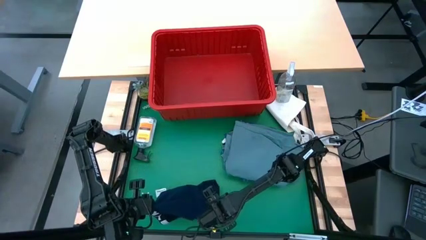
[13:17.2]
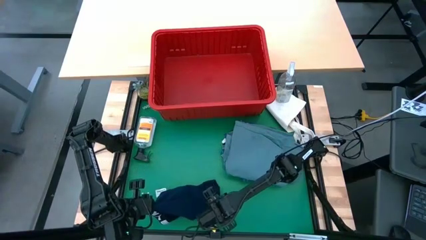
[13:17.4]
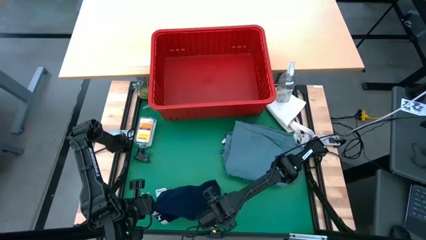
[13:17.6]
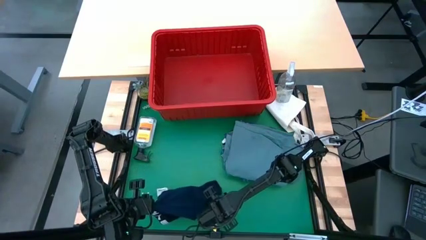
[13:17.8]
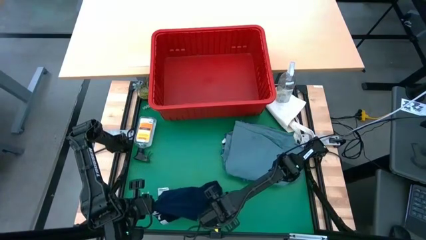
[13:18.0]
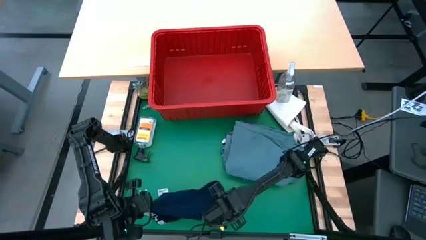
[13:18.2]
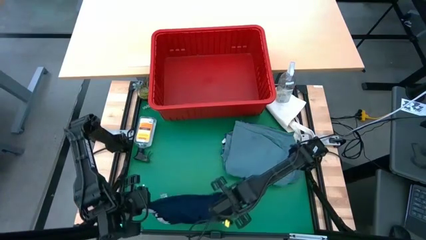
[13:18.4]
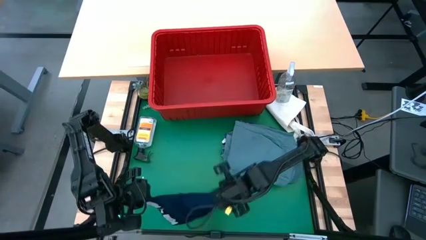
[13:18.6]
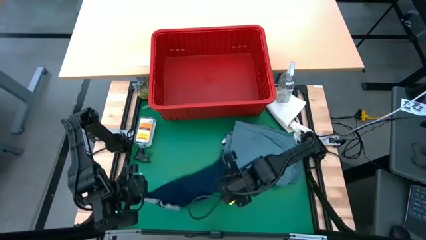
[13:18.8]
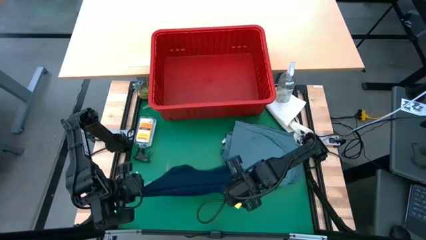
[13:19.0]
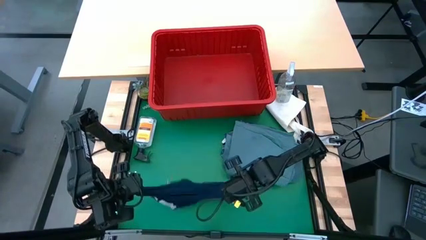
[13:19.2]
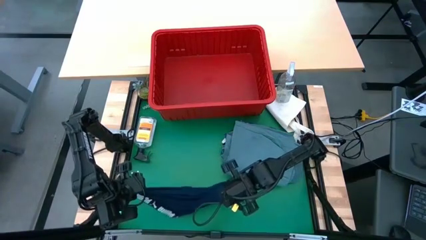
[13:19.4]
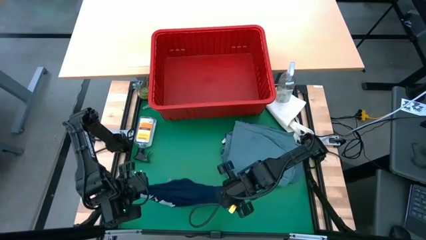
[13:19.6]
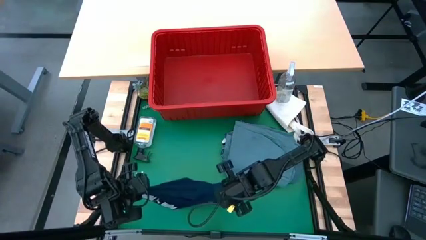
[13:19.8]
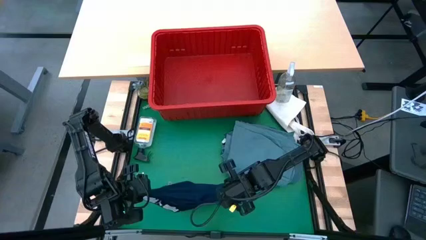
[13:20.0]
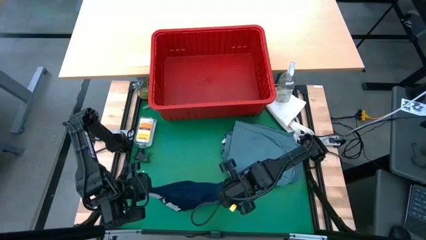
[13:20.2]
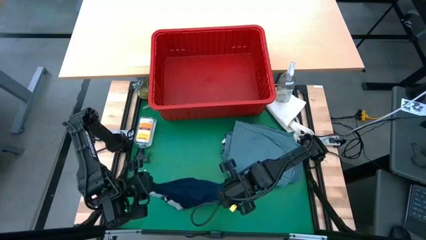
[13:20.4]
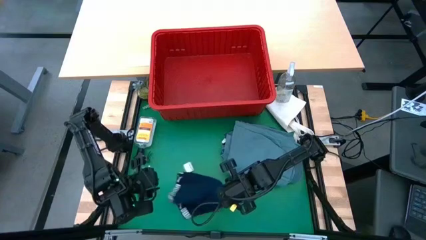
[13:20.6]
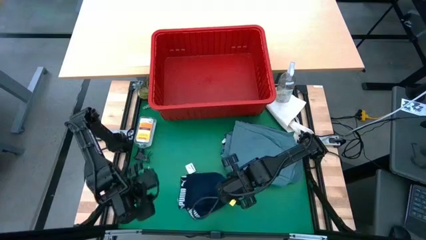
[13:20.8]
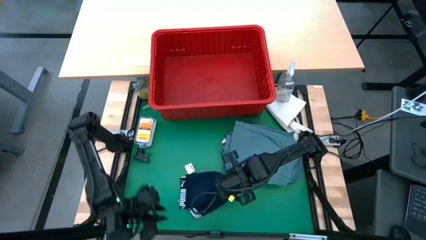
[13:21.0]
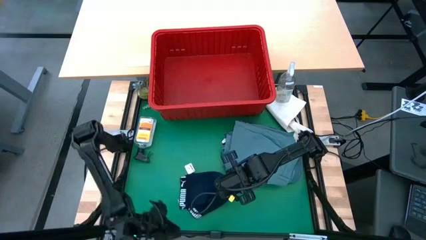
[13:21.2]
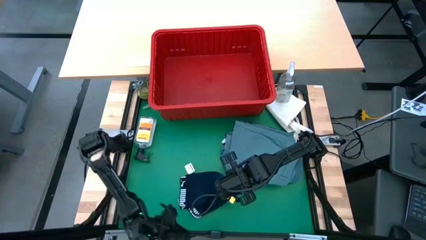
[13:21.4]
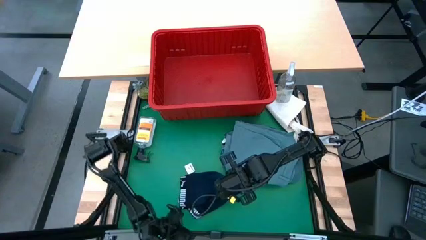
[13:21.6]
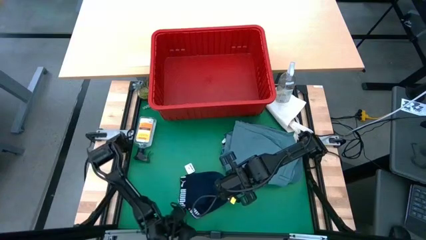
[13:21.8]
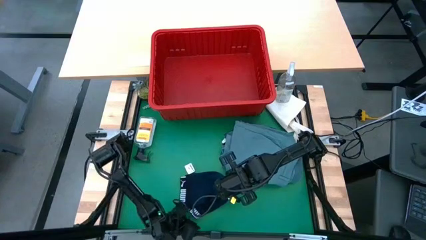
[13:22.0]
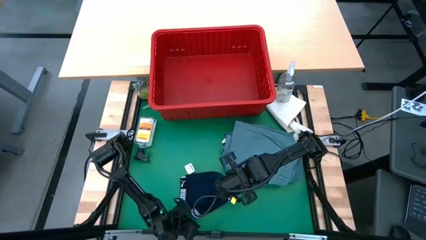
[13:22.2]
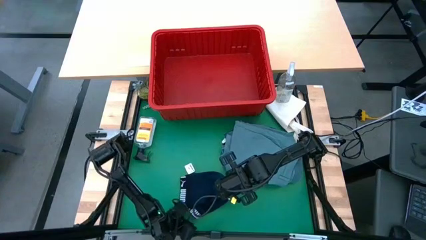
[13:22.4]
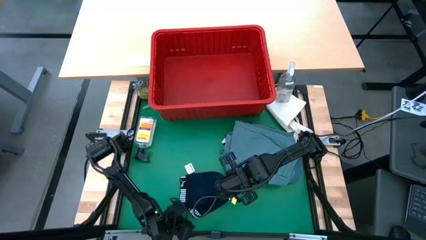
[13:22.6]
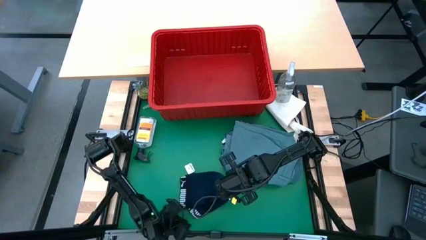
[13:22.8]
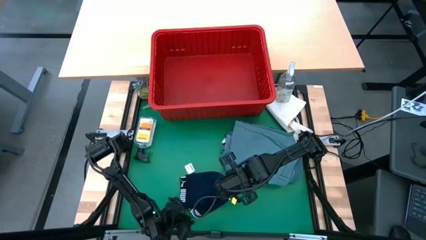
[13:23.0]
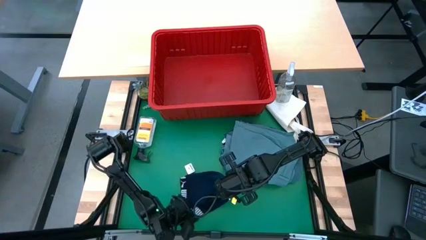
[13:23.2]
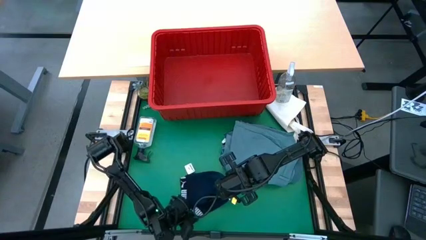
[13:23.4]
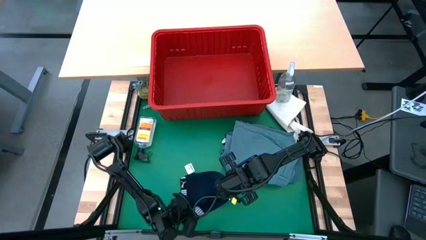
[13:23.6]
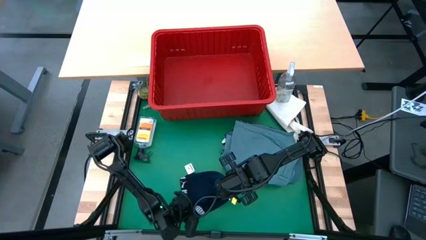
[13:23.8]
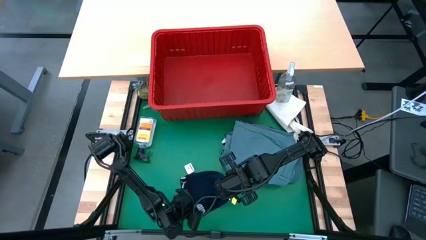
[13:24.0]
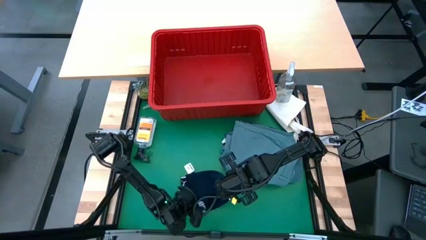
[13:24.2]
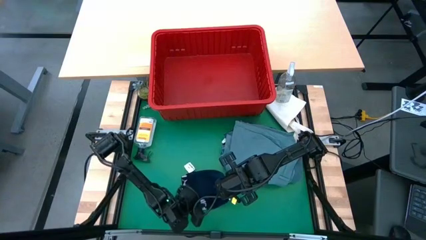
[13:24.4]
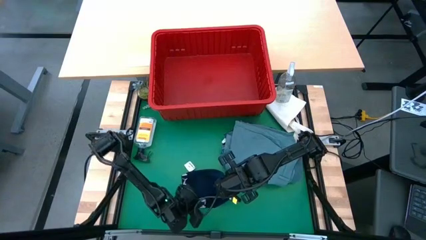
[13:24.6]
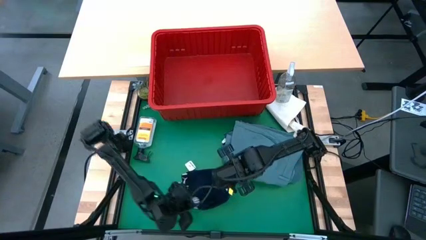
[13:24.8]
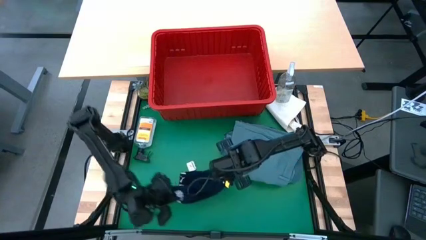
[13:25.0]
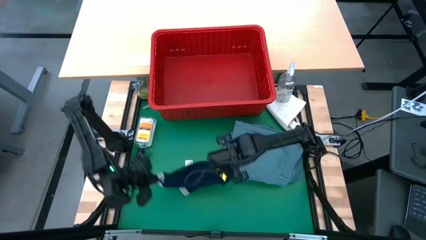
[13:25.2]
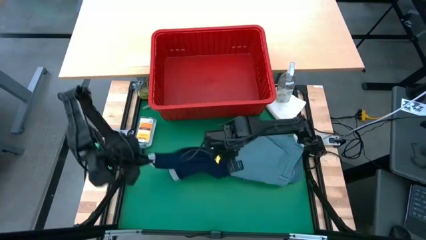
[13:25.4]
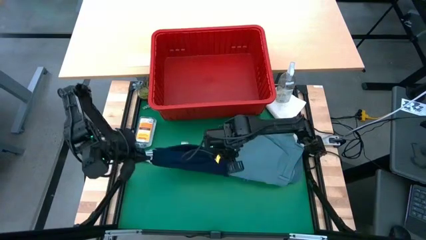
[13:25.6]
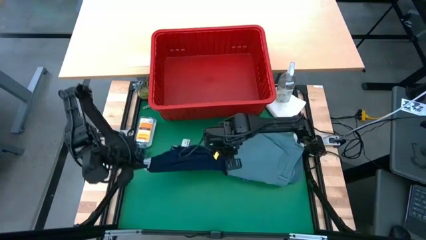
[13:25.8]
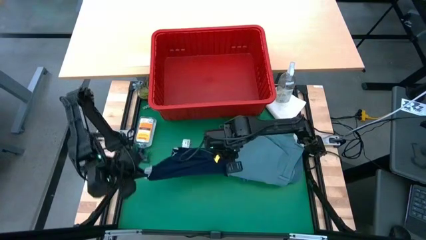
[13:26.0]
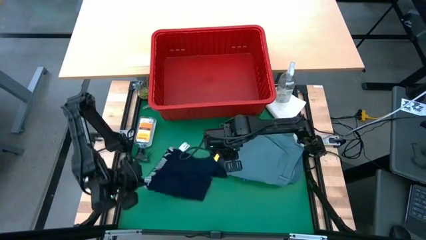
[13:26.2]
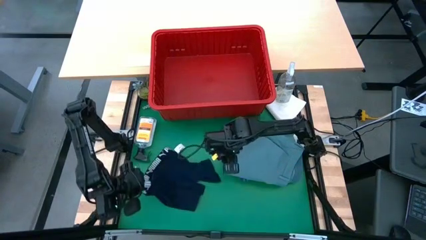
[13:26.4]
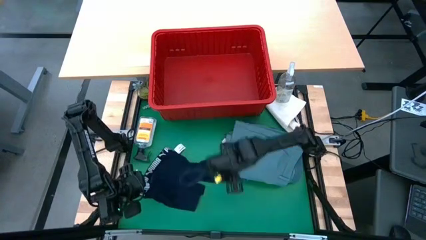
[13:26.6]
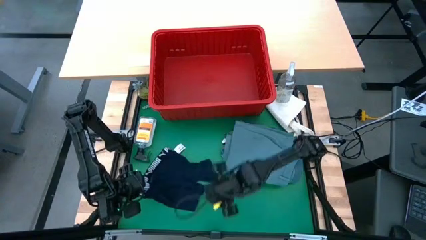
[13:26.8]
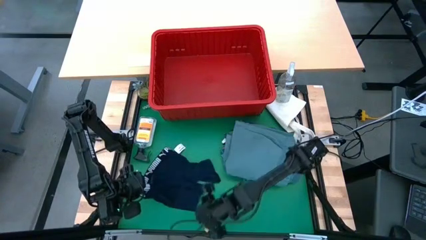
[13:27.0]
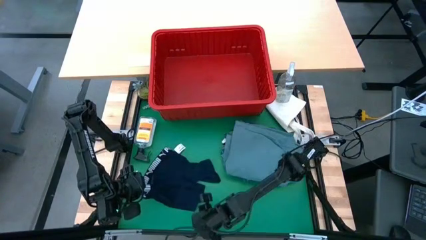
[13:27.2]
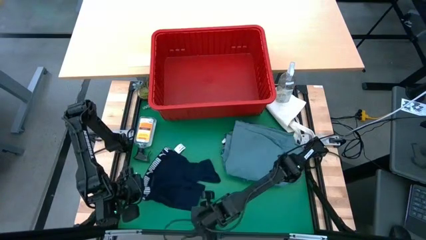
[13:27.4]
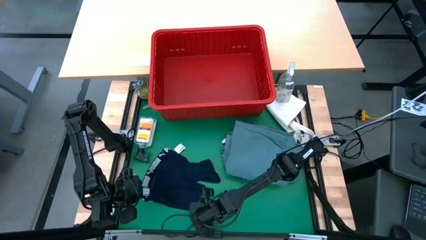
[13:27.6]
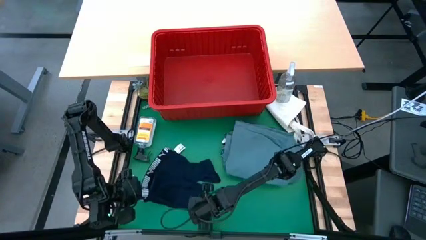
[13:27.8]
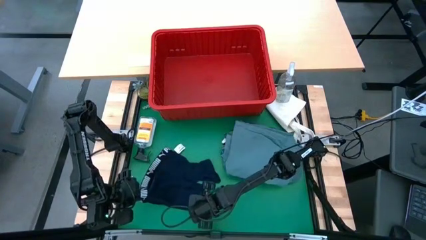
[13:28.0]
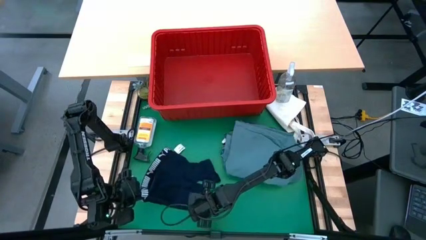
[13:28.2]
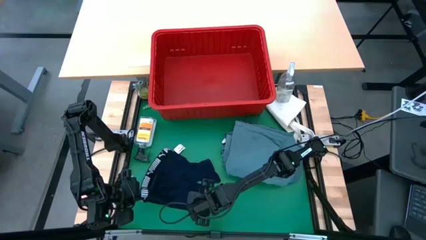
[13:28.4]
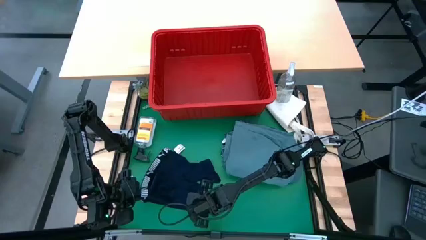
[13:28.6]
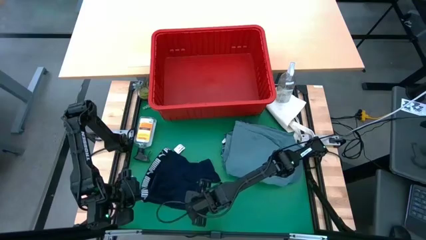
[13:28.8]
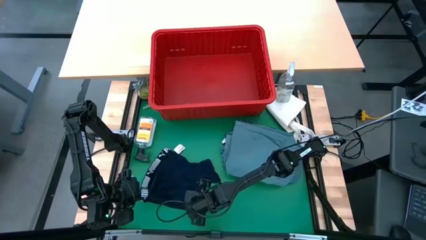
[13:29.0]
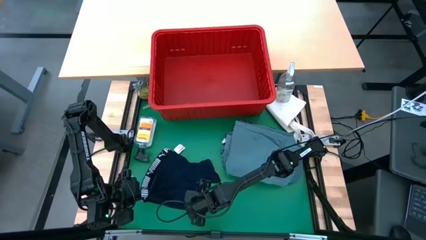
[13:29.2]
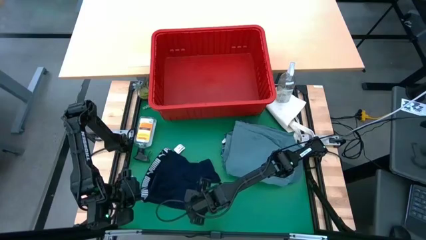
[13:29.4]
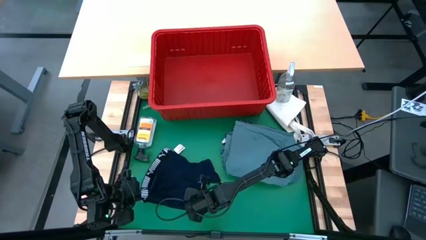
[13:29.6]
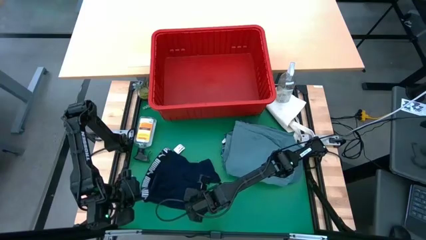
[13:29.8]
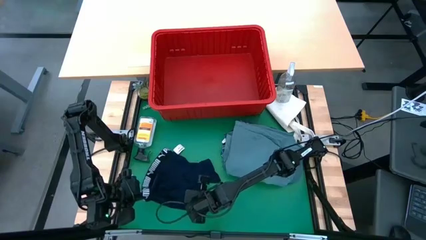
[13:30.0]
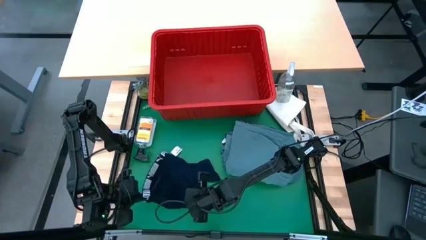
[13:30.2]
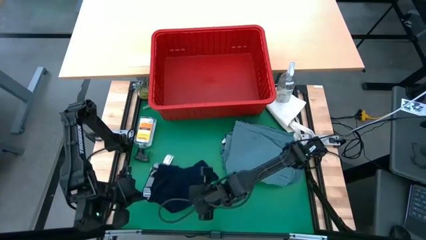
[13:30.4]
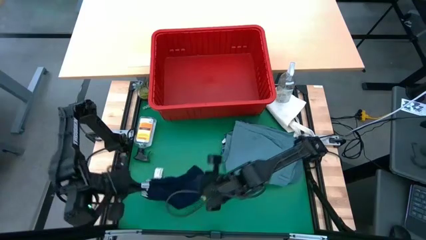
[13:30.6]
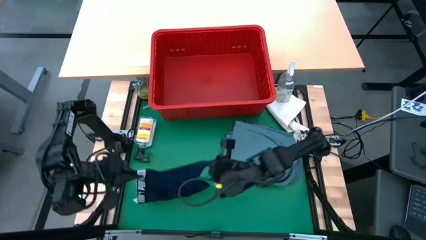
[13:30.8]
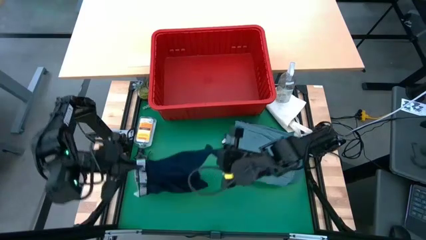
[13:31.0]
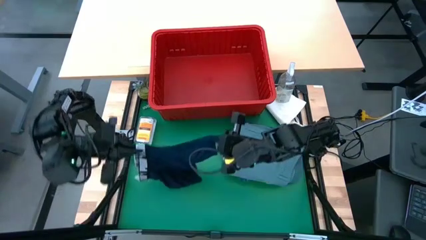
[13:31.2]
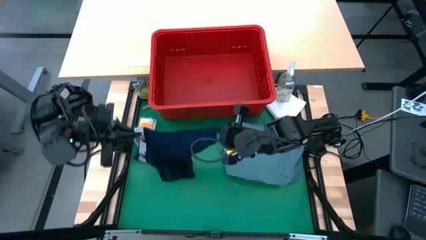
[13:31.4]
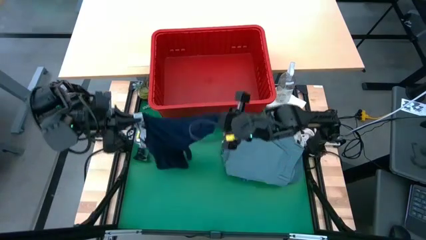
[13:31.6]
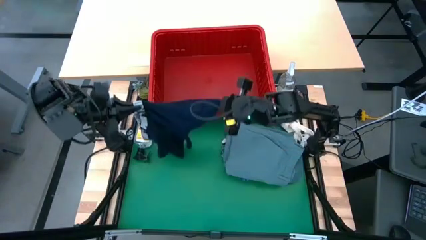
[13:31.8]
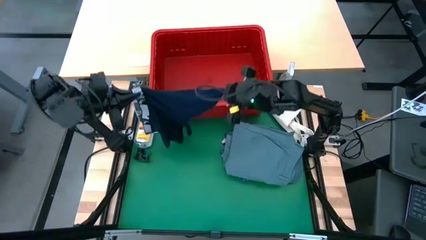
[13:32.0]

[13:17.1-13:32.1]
Task: Fold Laundry from Bin
Fold the dark blue underwear shorts
